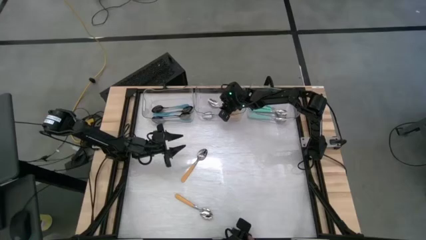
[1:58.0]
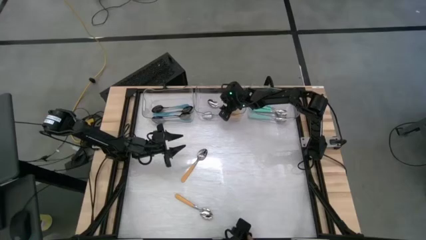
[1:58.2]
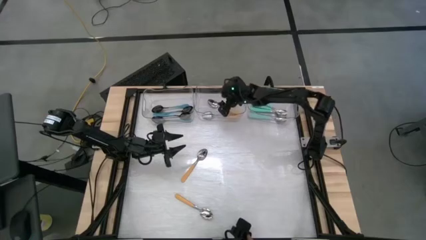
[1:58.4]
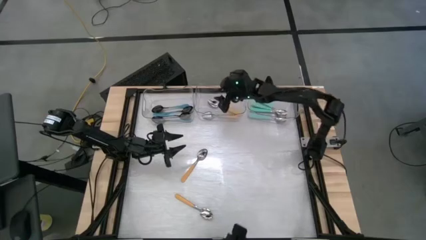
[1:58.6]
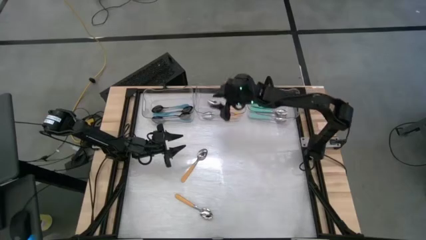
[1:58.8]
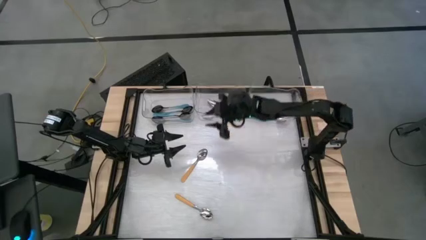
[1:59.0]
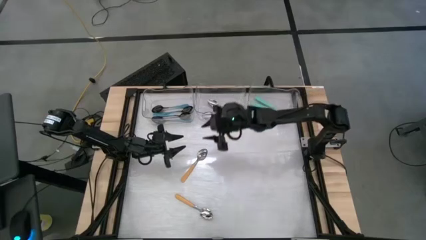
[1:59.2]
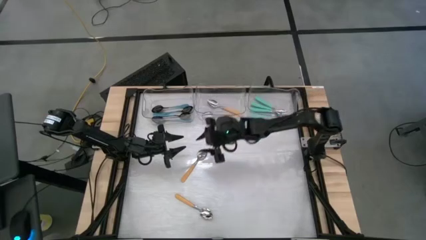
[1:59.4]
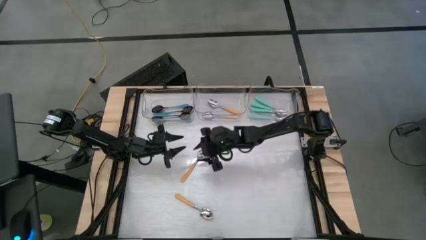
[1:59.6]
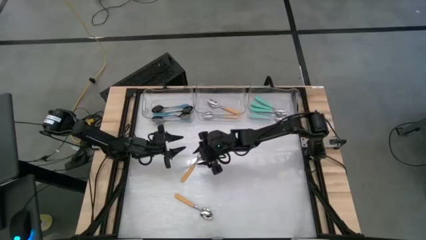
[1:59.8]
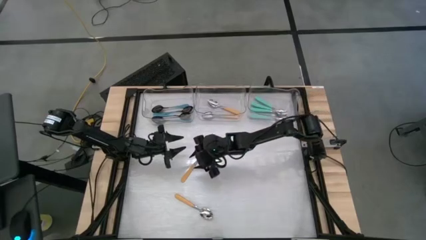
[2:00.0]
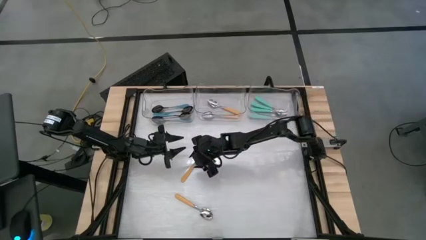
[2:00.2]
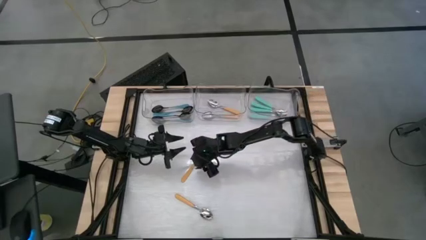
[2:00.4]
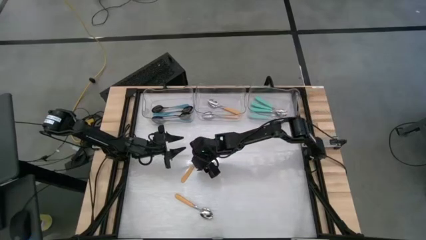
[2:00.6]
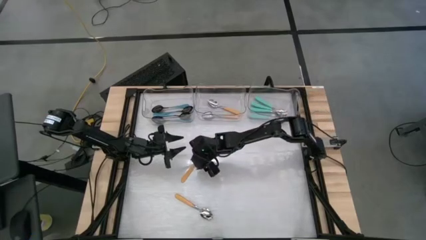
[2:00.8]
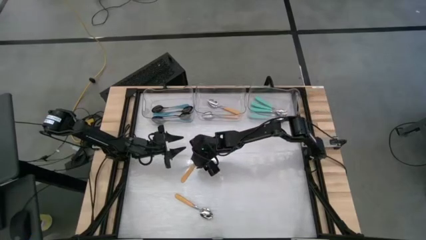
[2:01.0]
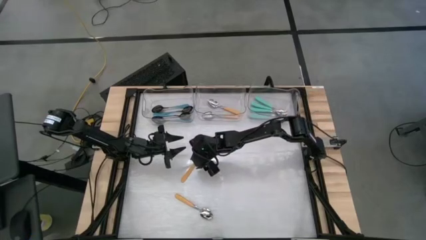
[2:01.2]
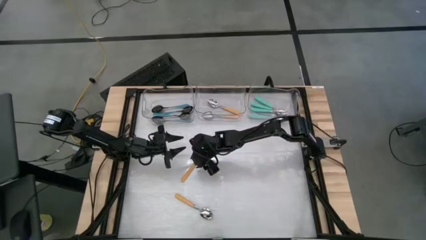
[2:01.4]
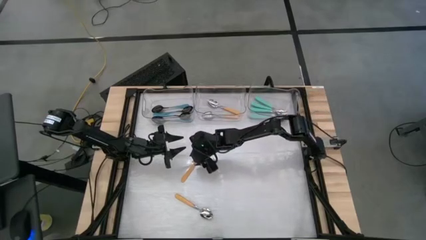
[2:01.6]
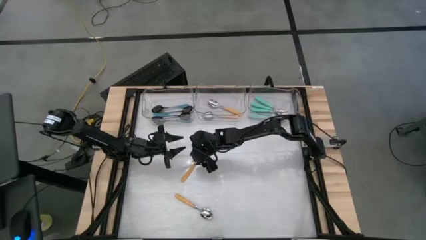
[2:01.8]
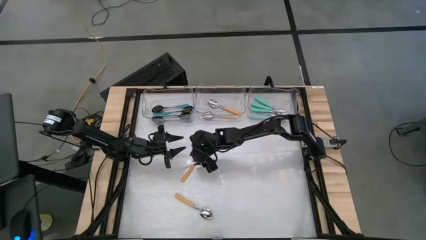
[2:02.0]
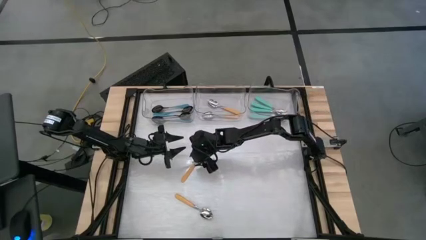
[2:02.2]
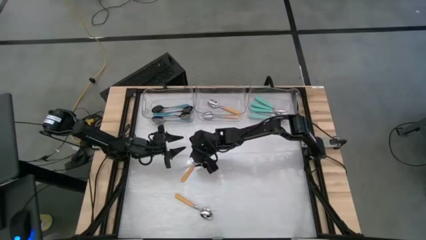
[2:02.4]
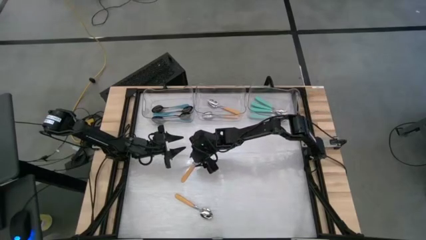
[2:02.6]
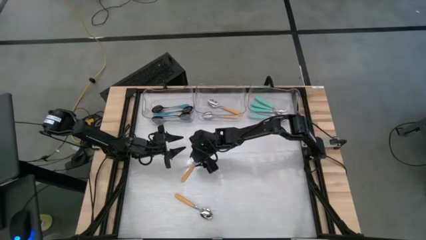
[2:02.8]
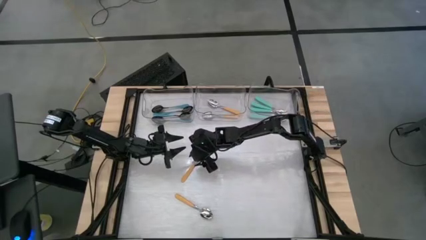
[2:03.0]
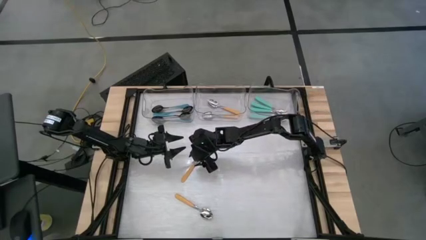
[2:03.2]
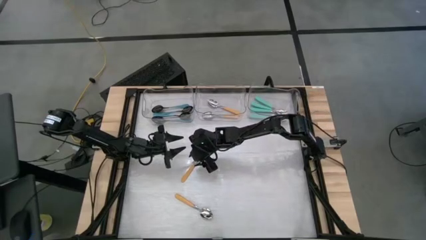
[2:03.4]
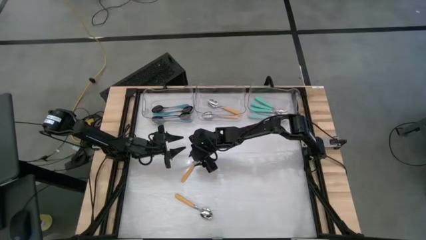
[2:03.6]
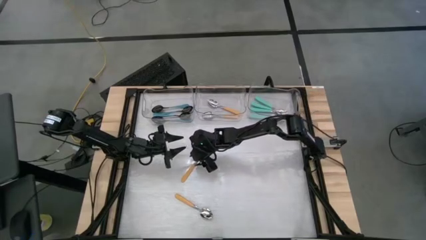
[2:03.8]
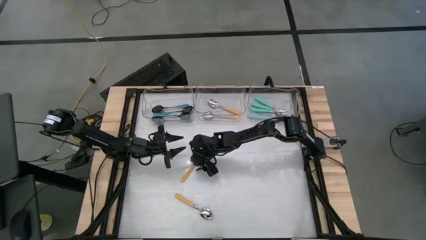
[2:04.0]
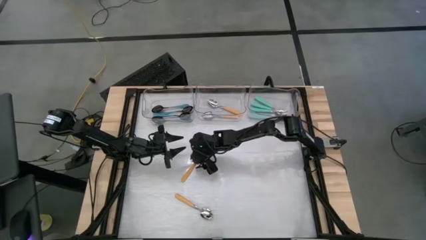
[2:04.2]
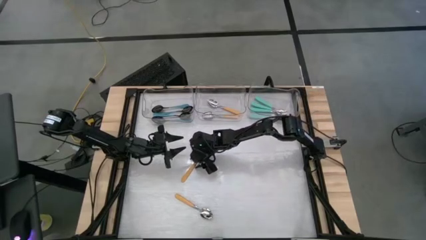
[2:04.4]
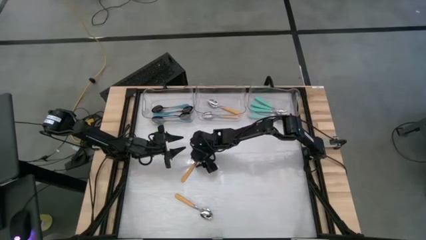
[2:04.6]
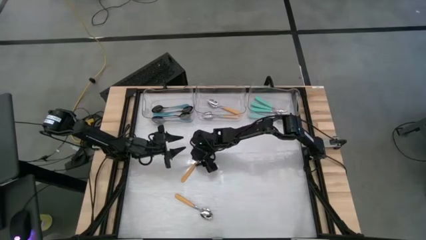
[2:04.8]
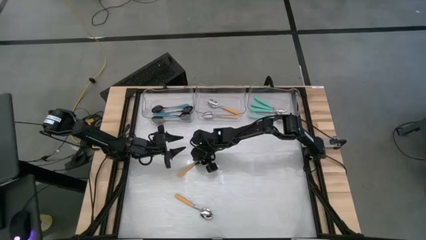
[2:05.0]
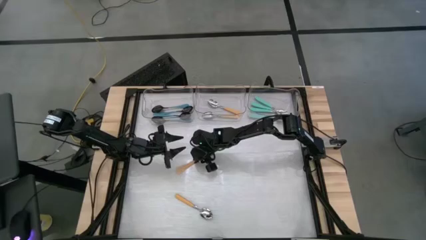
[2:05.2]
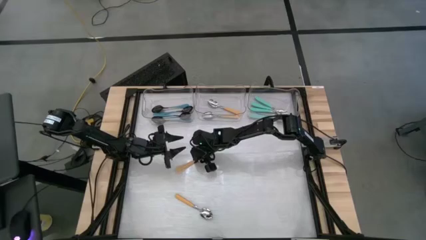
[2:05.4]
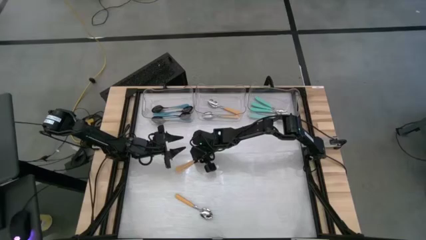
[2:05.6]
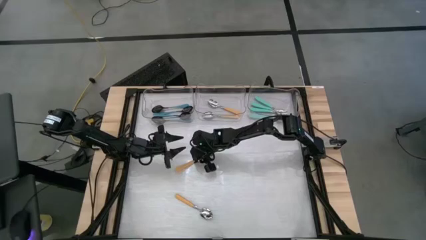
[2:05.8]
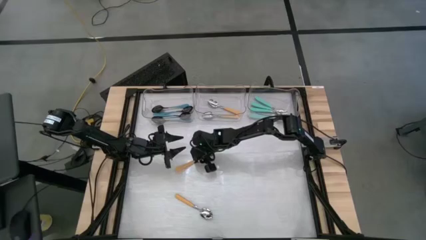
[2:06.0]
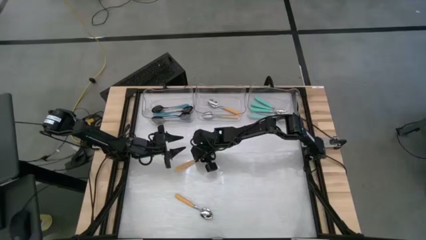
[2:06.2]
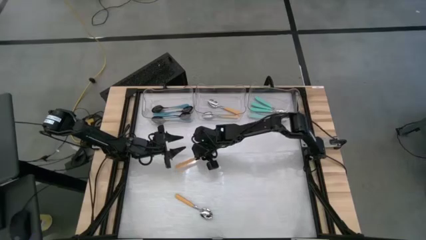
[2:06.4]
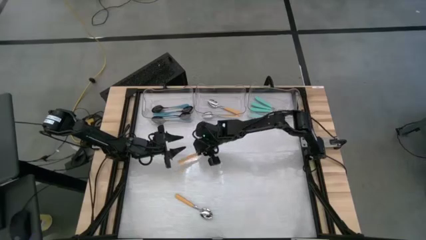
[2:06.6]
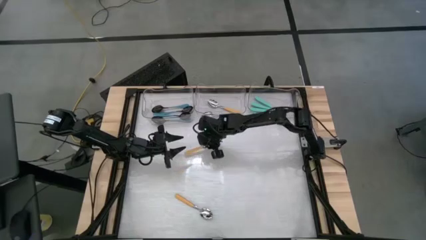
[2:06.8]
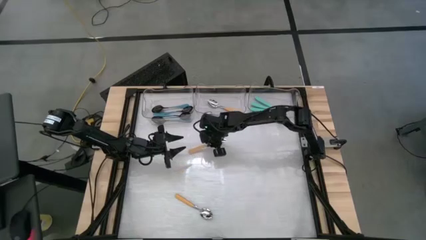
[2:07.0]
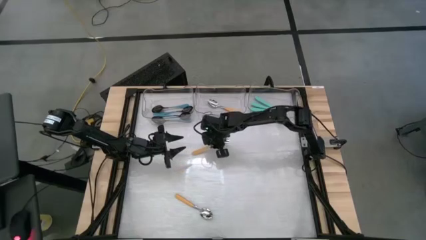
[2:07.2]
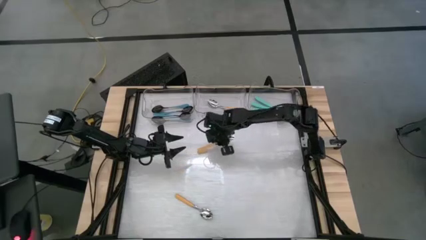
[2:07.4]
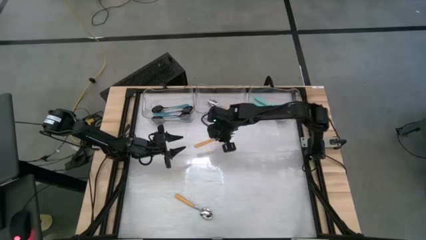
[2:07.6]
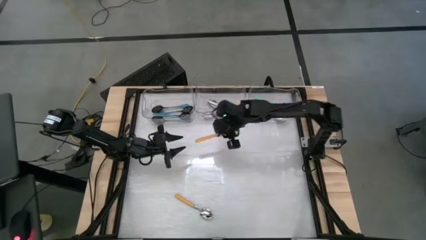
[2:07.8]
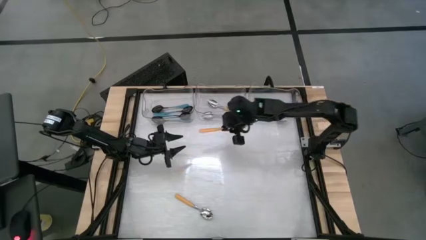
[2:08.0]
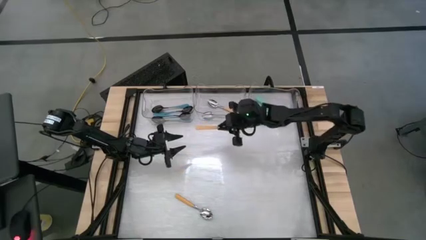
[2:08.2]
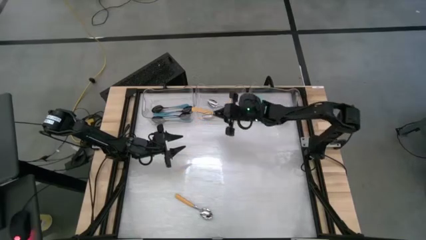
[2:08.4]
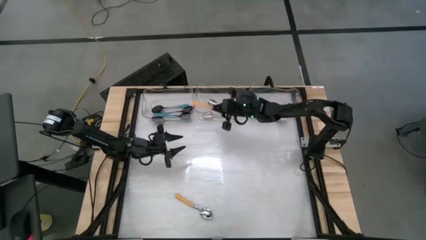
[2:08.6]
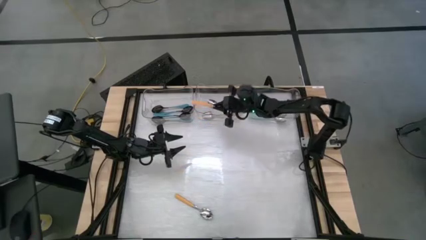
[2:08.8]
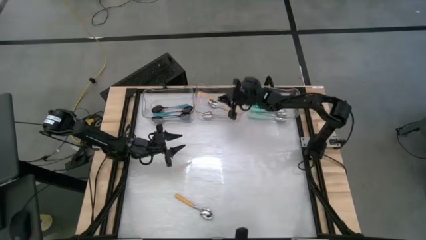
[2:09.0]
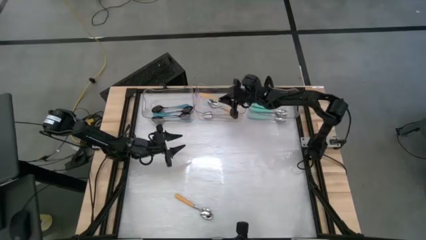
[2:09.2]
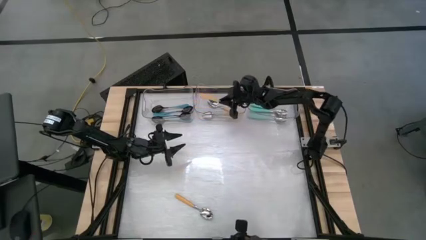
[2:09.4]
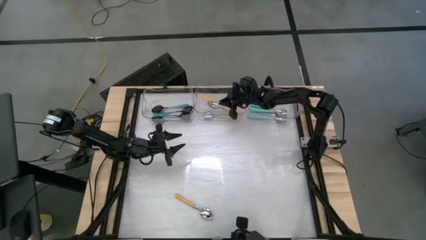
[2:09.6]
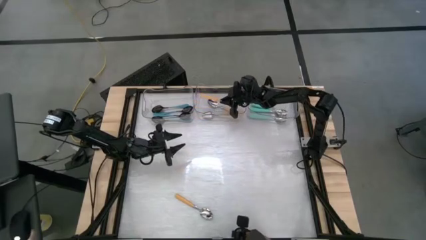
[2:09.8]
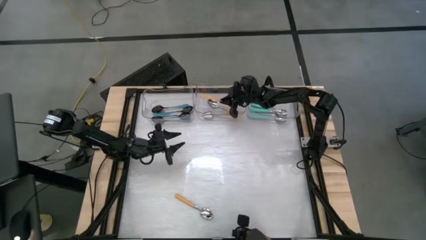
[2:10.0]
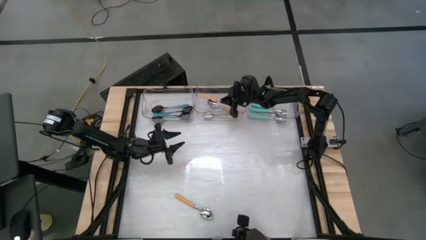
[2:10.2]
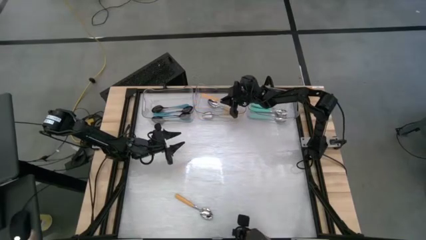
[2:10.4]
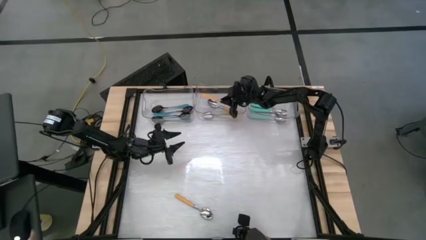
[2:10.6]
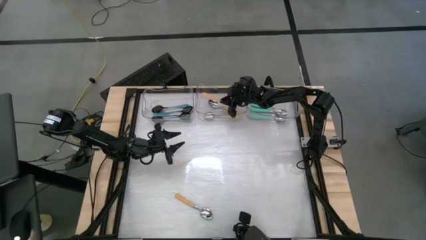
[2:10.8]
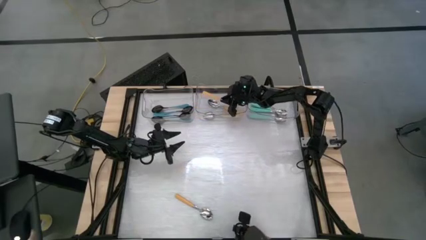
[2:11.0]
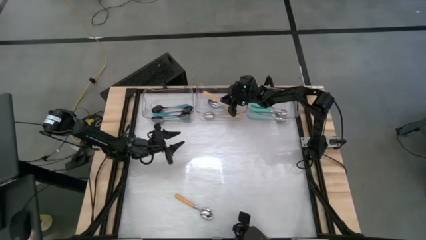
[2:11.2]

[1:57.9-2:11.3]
Task: Sort silverware by color (type)
Put the top yellow spoon into the top center transparent bin

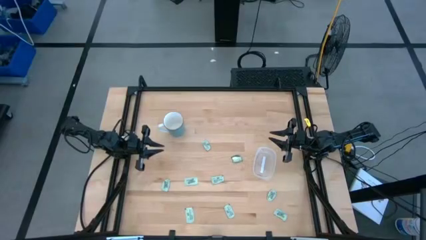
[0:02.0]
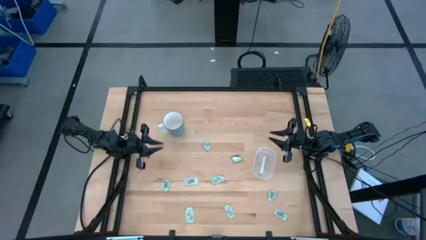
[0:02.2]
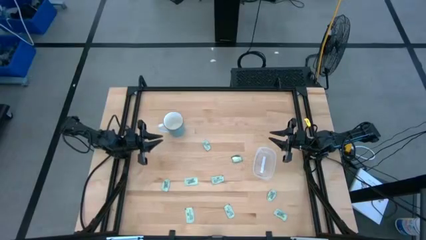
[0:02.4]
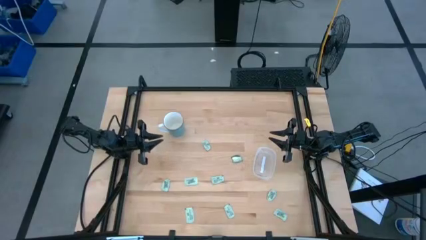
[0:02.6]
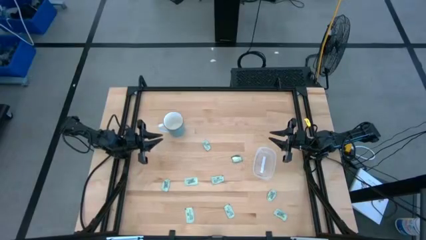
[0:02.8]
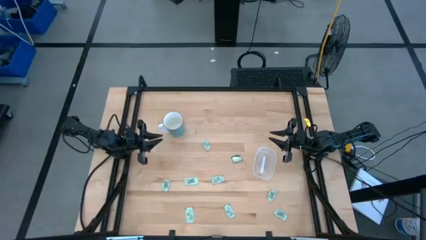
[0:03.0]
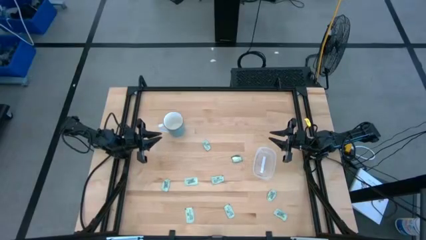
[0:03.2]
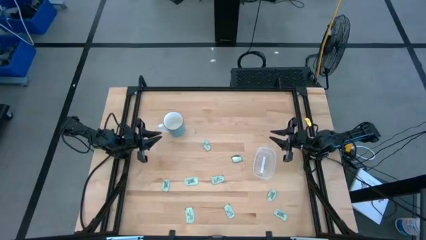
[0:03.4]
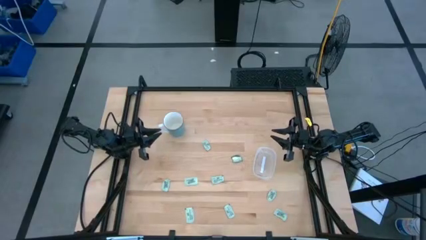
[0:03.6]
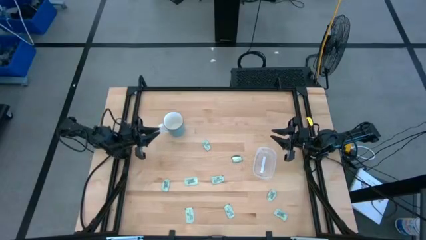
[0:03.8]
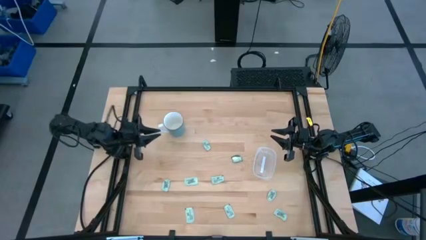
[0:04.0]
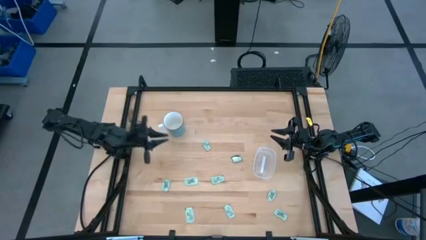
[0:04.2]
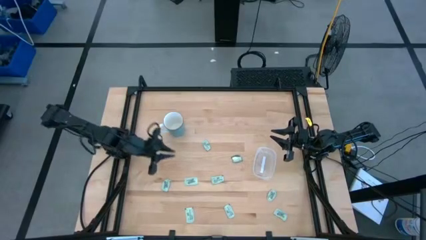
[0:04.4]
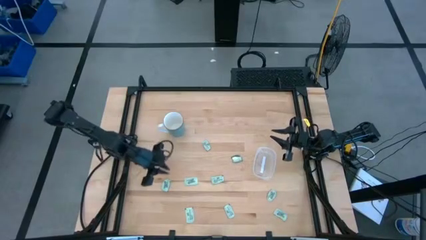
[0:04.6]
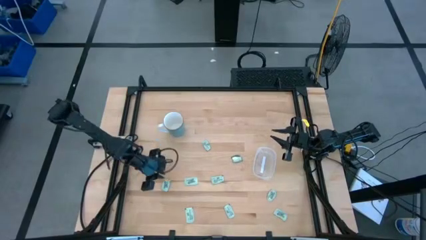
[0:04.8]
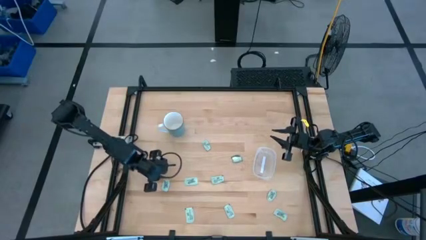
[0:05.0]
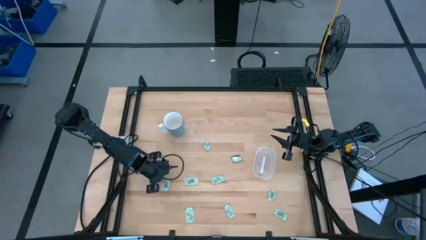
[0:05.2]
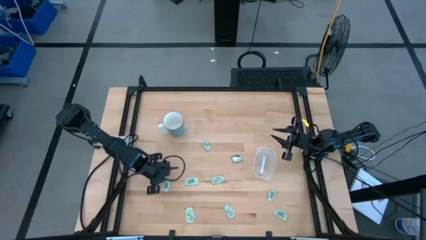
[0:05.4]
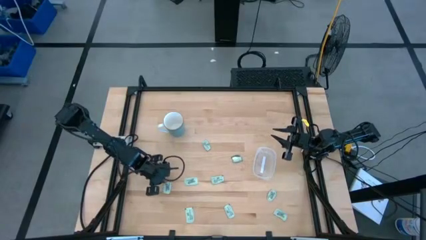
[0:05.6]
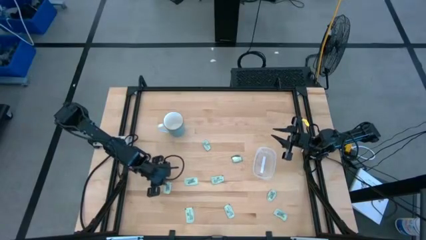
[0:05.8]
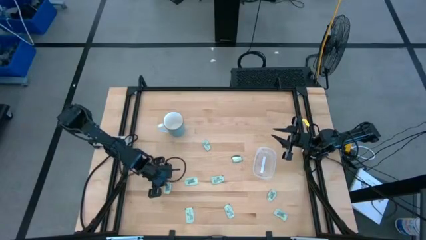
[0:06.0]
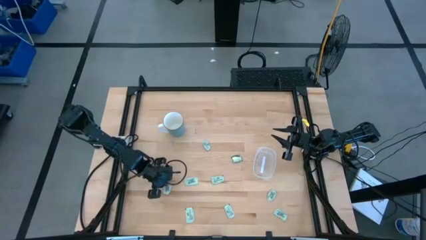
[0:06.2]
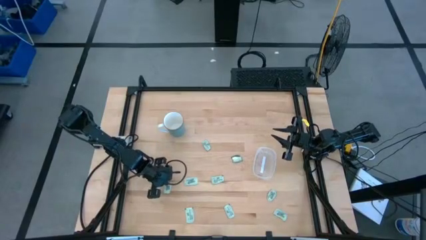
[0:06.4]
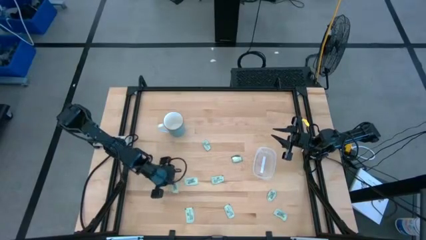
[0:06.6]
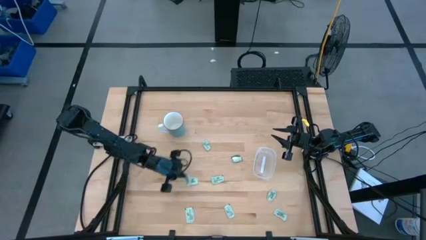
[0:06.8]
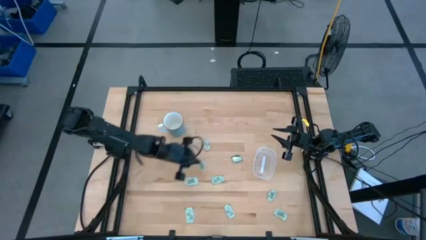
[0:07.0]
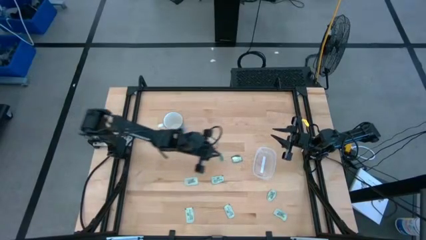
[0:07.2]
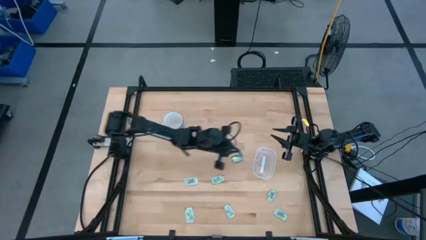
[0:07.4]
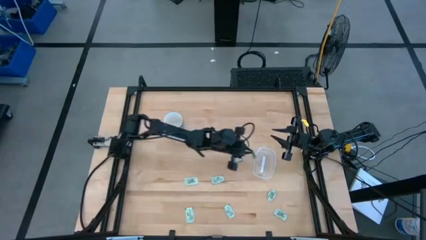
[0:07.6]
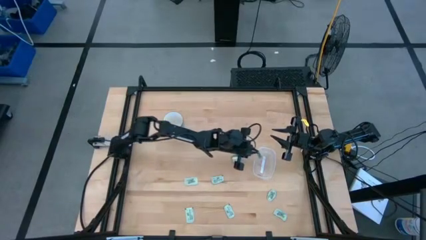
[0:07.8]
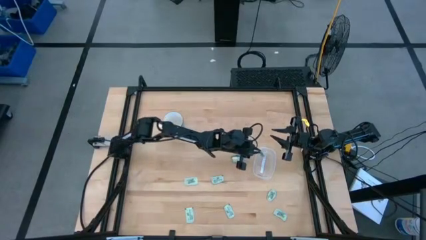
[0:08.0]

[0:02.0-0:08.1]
Task: Pick and place Stevia / Truvia into bins
Put the green stevia packet into the container
